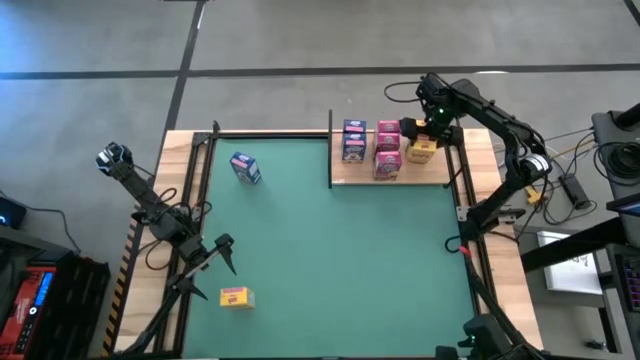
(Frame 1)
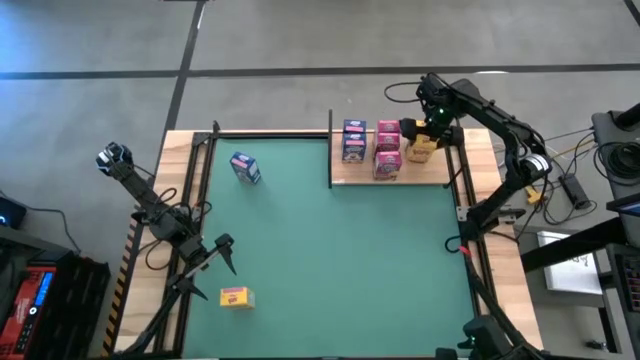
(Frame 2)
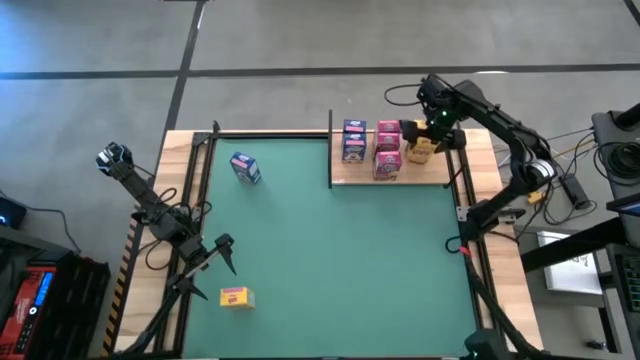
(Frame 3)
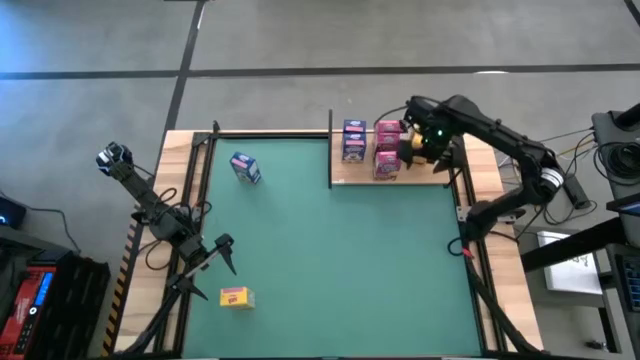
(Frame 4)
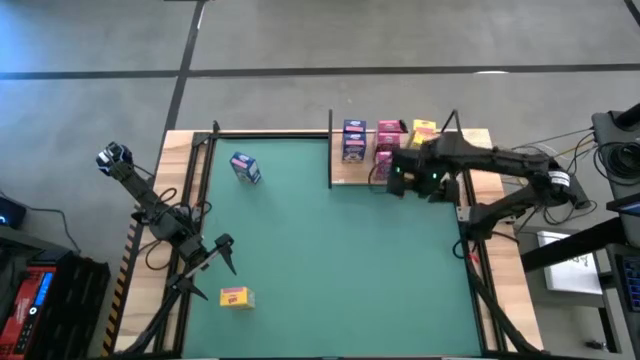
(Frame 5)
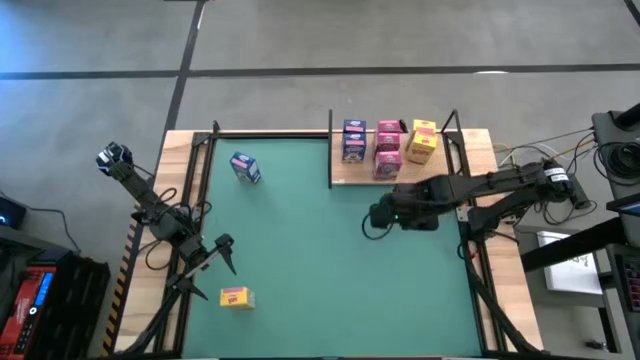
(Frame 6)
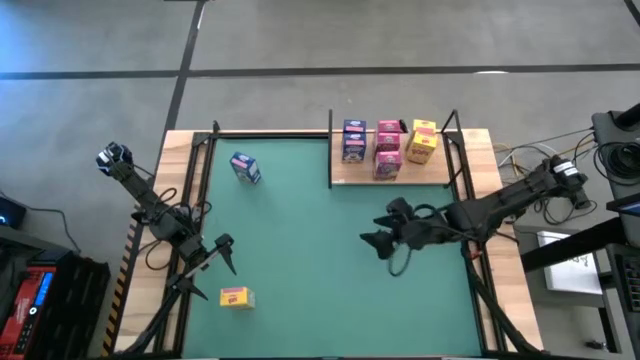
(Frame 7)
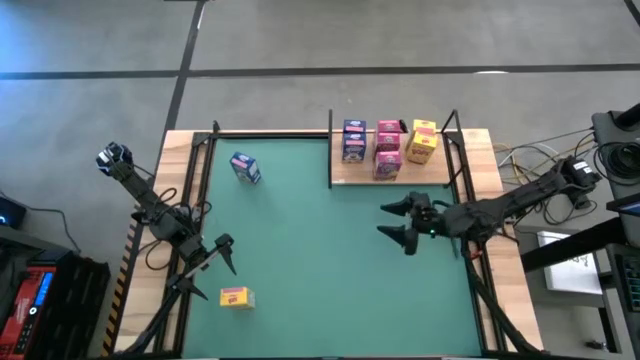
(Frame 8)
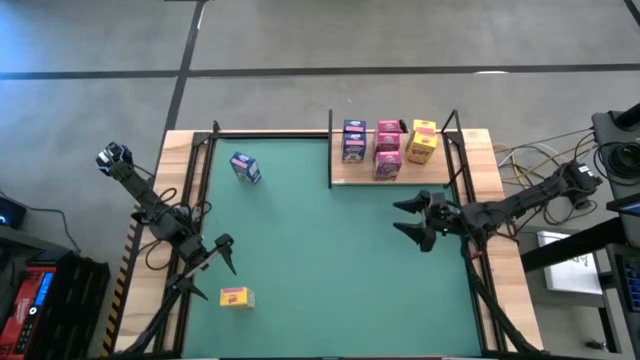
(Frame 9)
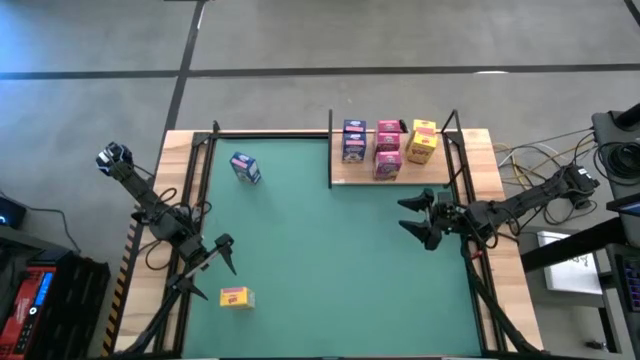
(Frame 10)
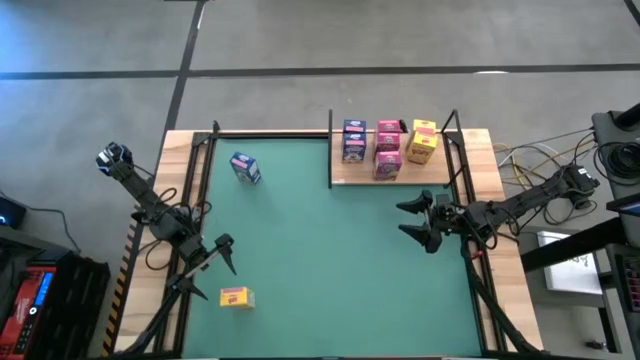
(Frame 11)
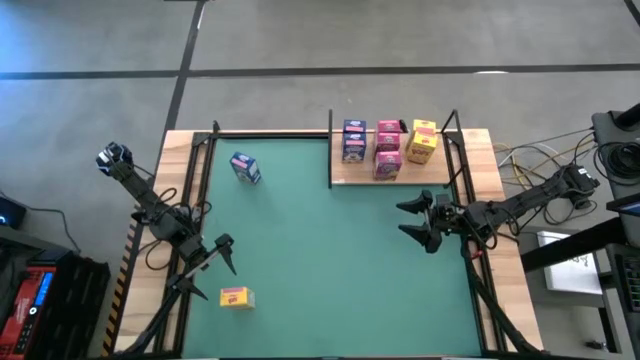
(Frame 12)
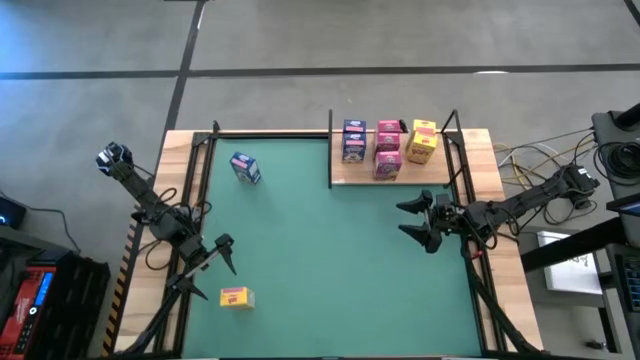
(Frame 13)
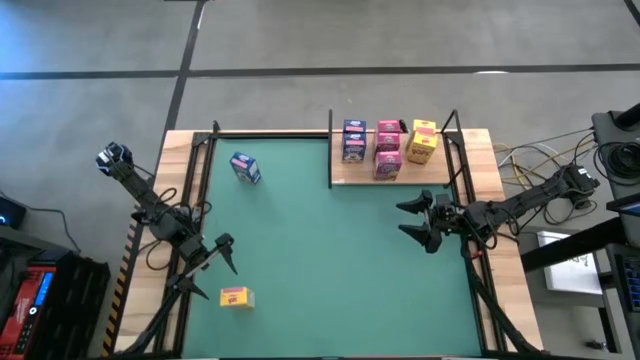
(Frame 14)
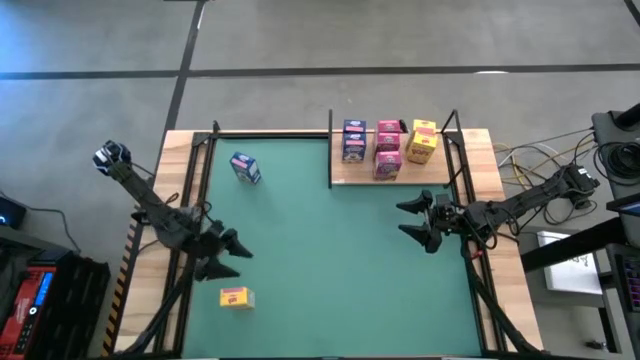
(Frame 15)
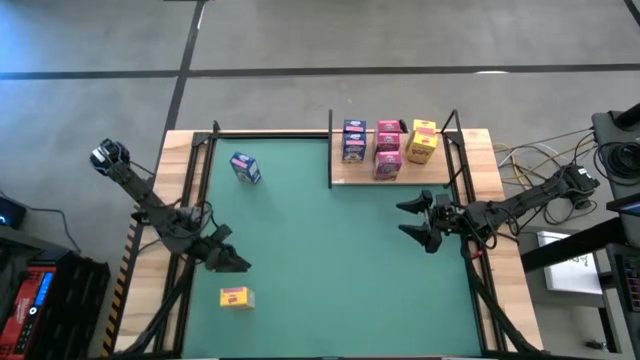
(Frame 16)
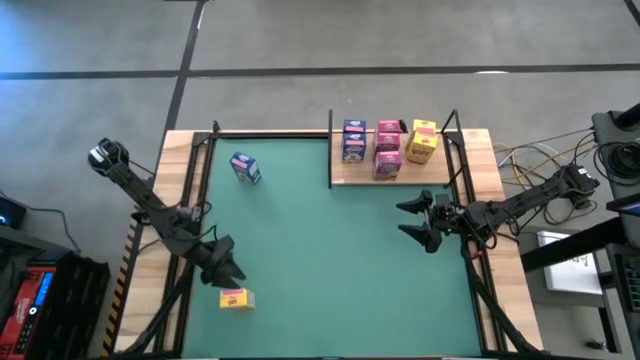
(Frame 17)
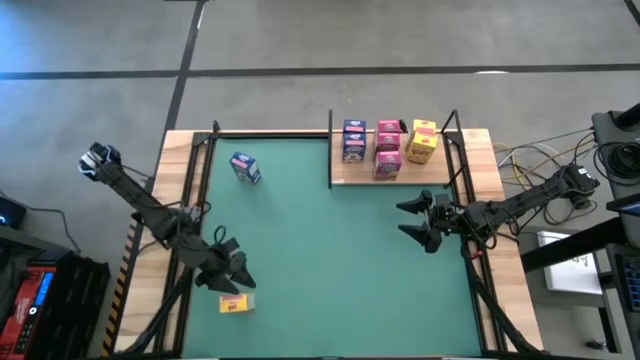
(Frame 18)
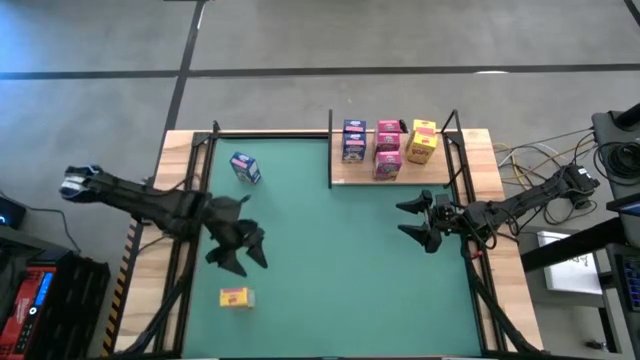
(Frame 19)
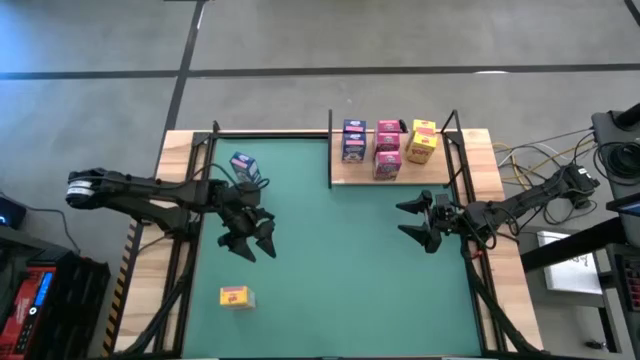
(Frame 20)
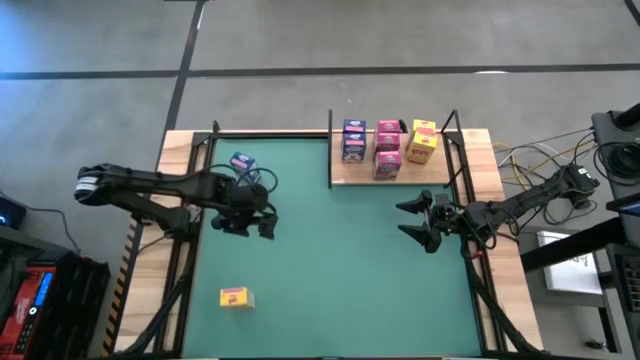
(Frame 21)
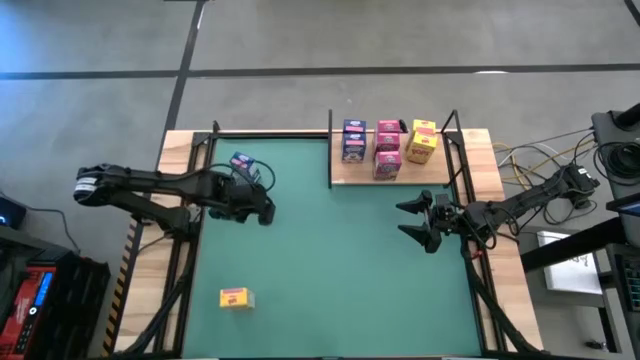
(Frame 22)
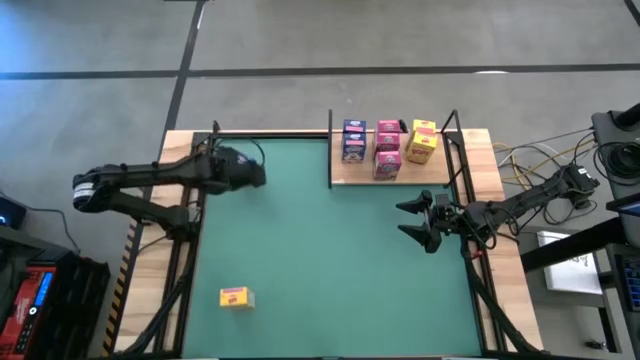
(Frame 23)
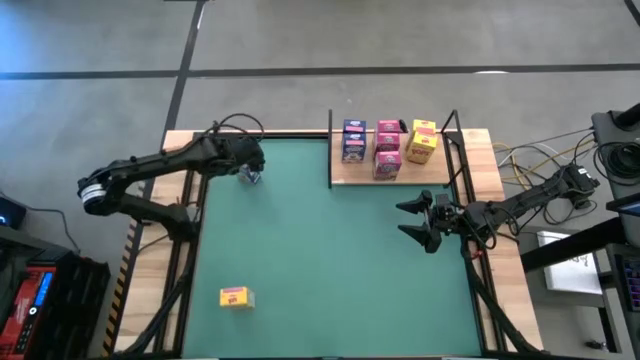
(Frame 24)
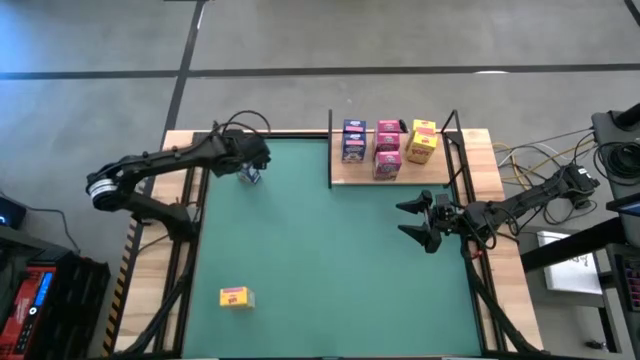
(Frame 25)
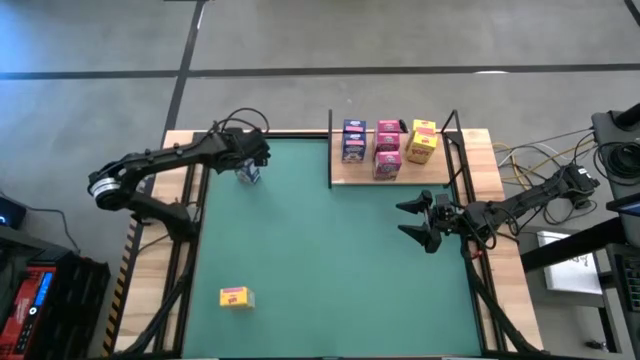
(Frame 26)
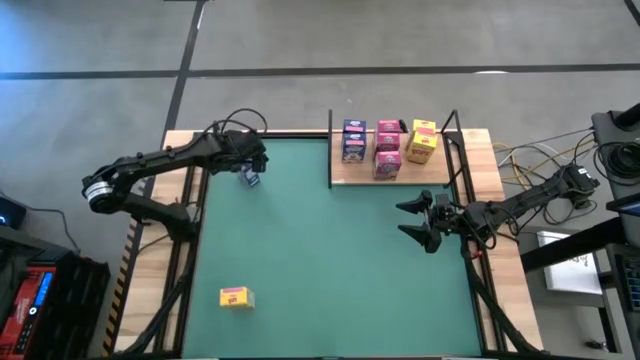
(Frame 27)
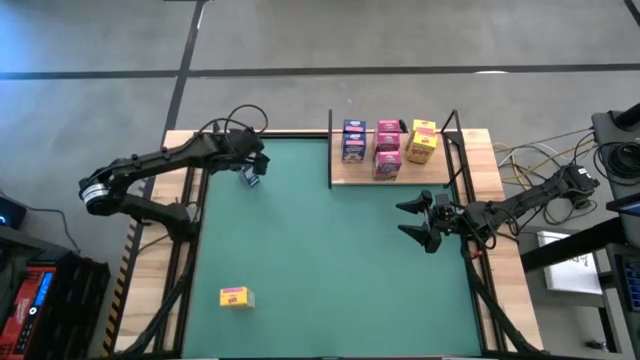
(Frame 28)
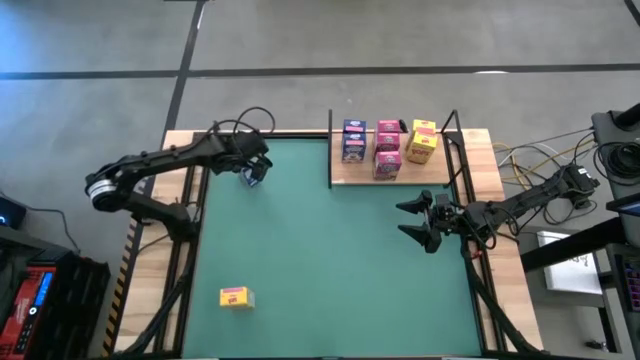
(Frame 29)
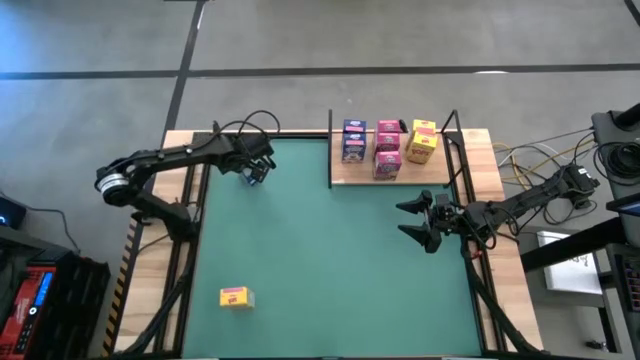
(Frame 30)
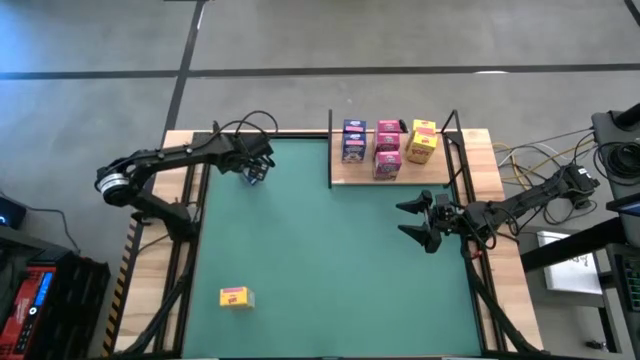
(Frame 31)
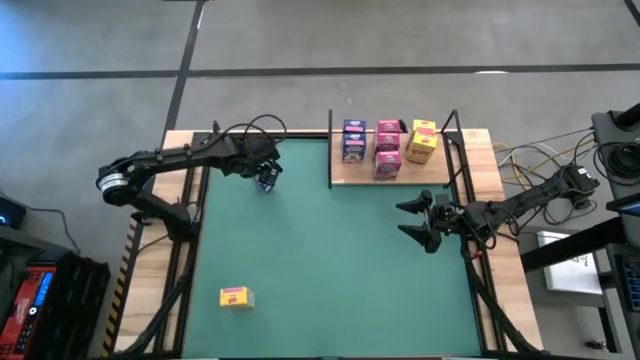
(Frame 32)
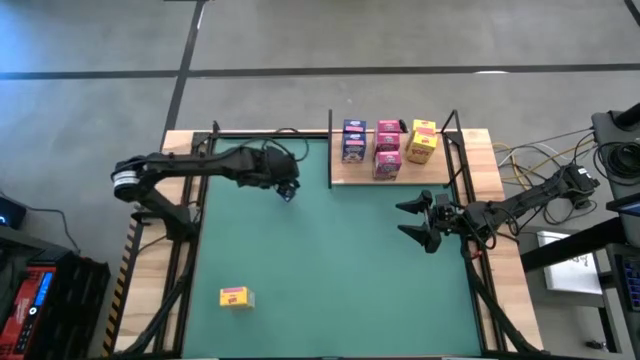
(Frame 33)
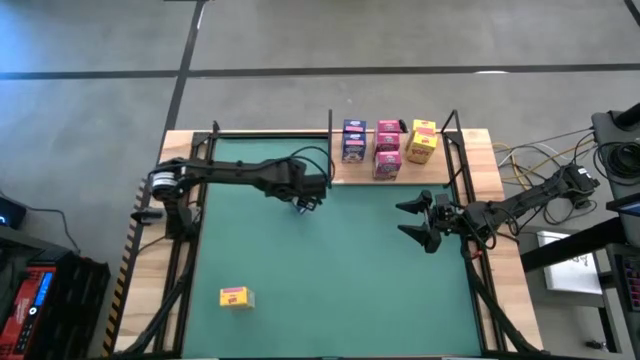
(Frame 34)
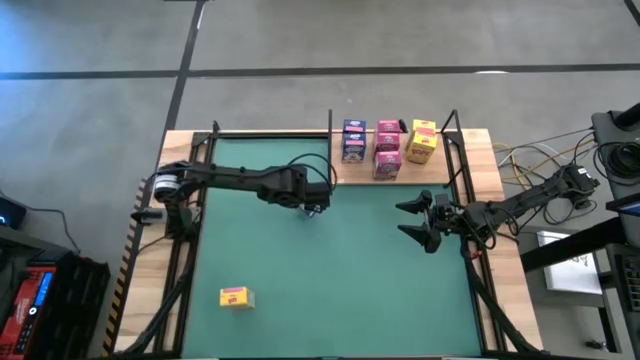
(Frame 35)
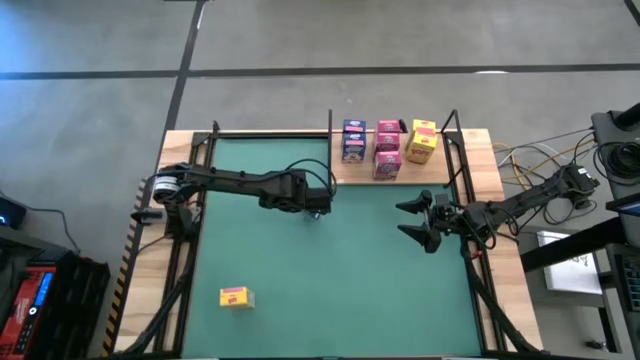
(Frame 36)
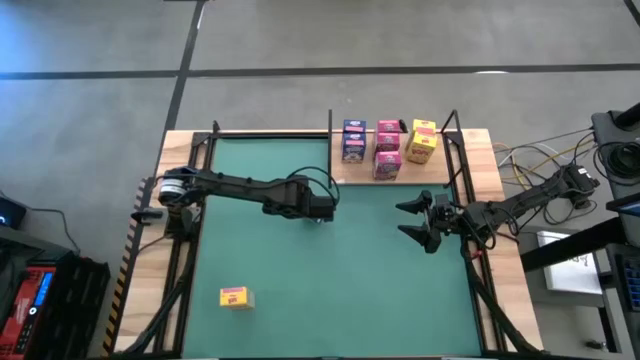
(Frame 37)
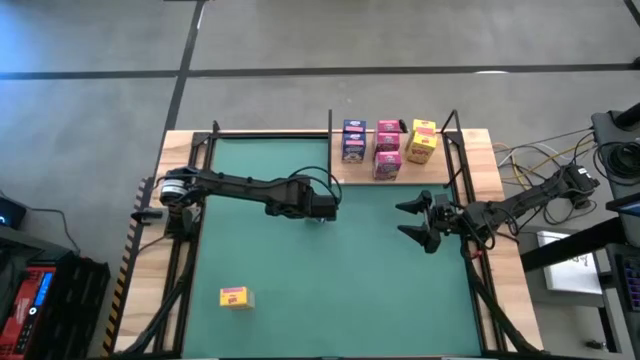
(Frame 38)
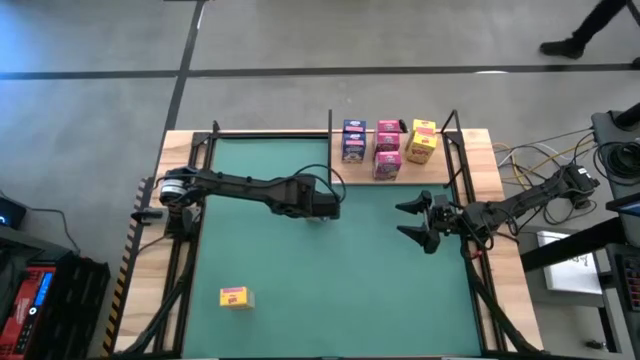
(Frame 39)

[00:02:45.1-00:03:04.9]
Task: Stack cereal on shelf
Move the blue cereal box to the center

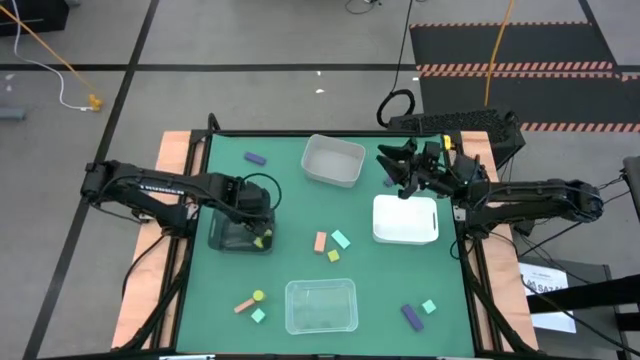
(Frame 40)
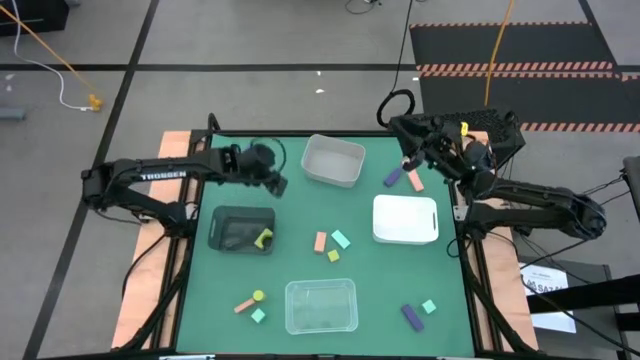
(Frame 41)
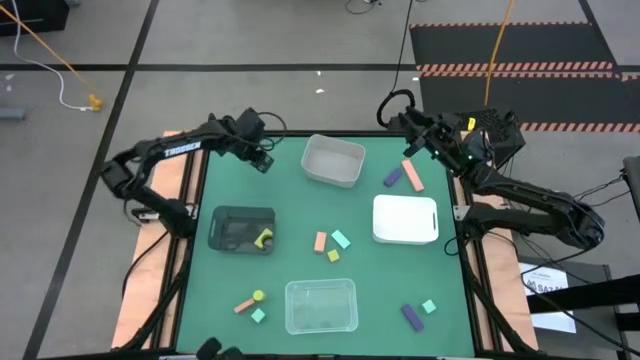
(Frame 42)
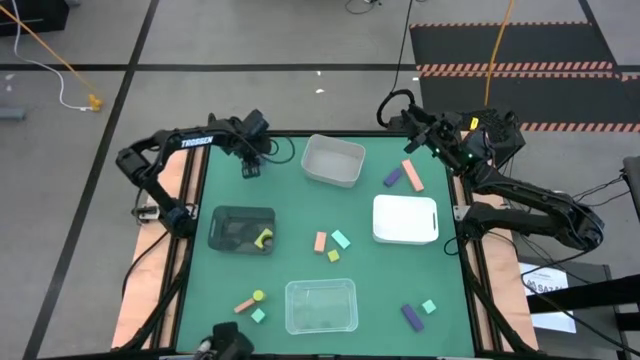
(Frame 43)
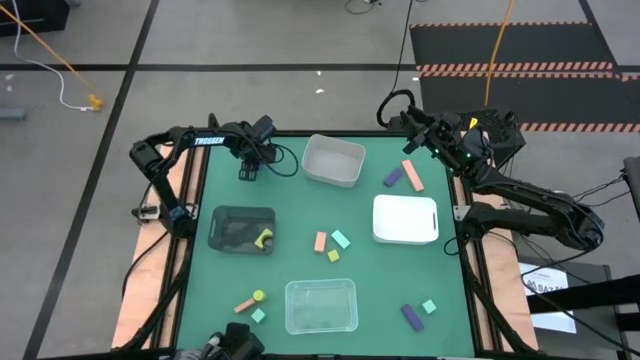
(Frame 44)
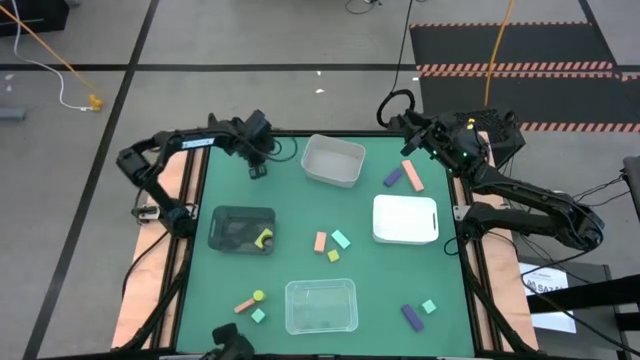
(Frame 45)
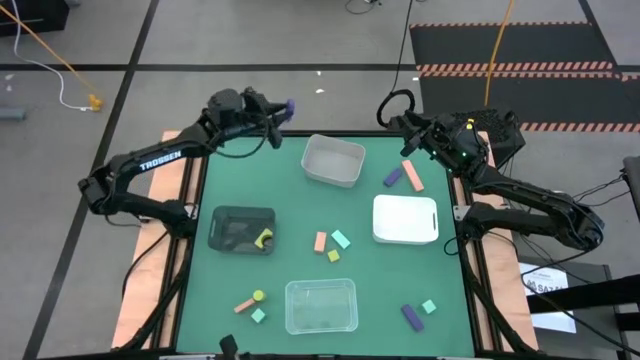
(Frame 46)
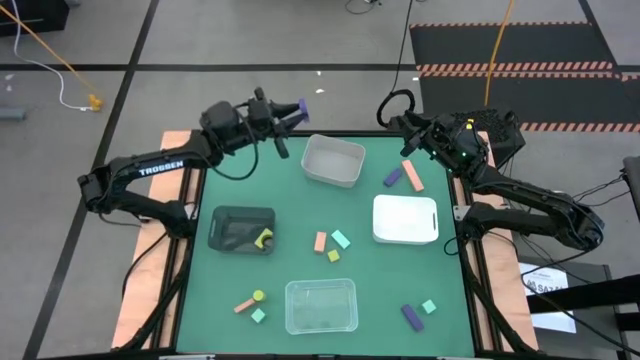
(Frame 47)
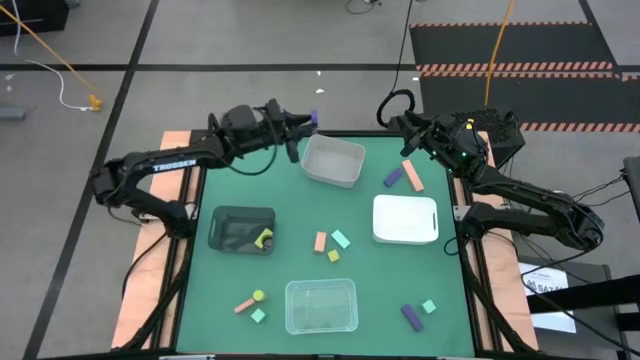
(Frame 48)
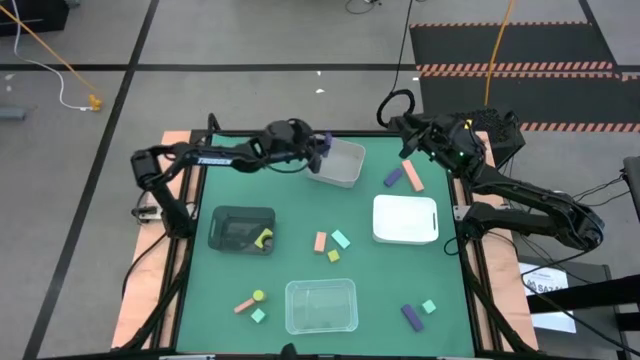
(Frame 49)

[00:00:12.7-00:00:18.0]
Task: Sort & place blocks by color
Put the top left violet block into the grey bin
